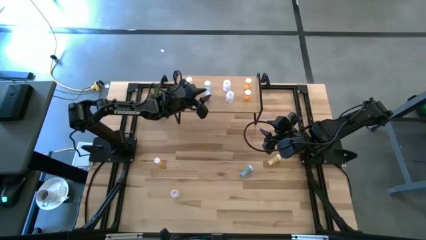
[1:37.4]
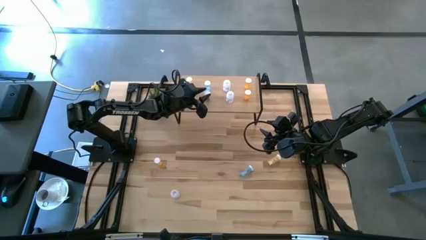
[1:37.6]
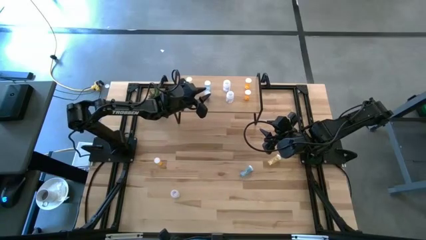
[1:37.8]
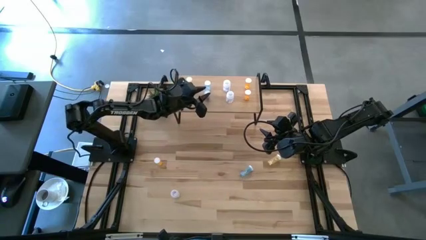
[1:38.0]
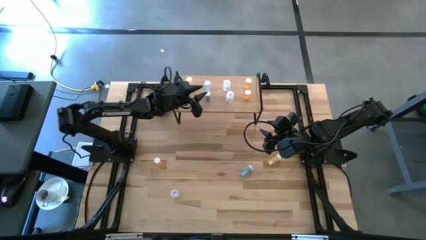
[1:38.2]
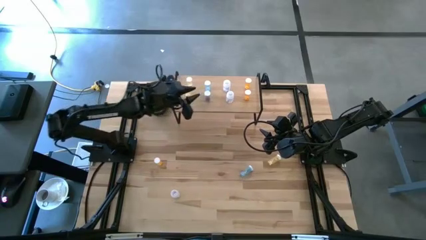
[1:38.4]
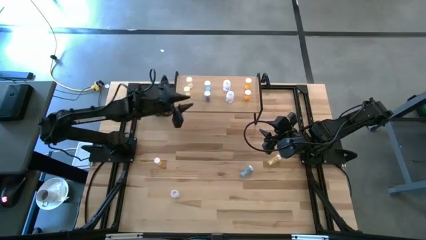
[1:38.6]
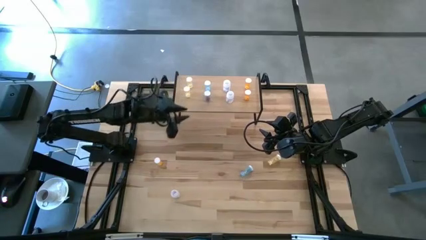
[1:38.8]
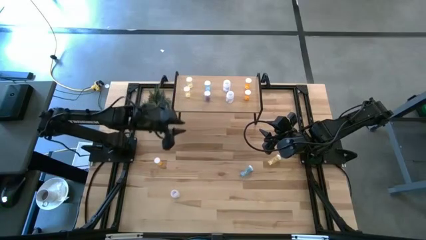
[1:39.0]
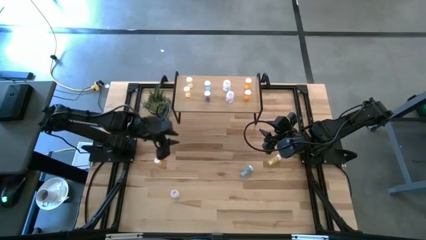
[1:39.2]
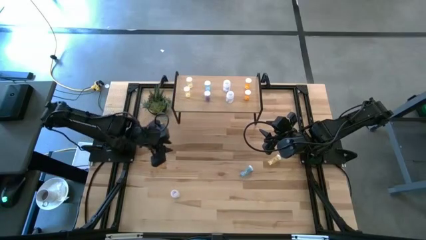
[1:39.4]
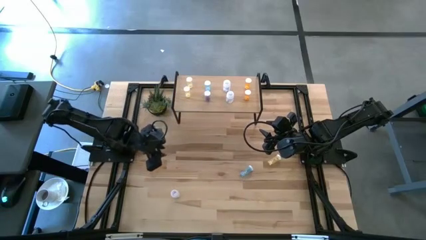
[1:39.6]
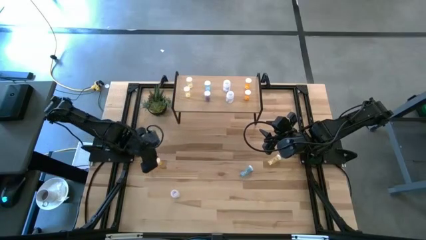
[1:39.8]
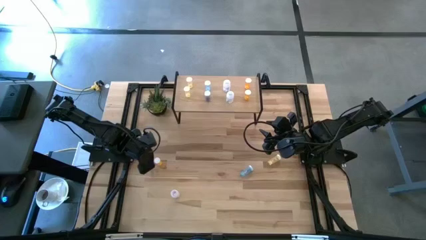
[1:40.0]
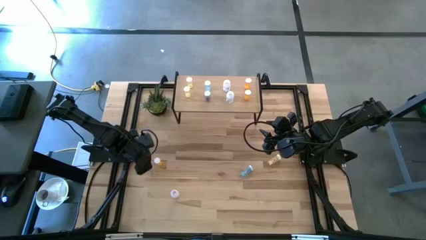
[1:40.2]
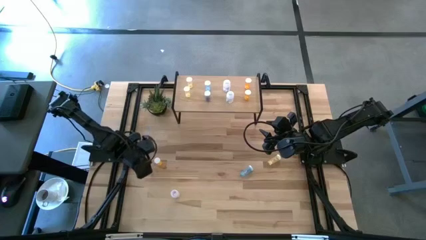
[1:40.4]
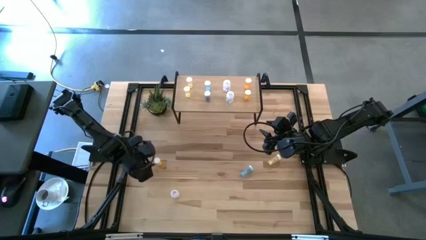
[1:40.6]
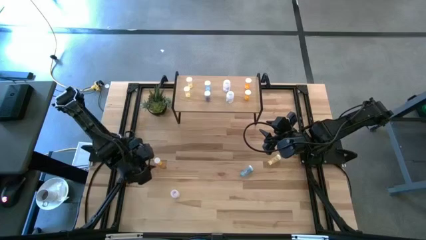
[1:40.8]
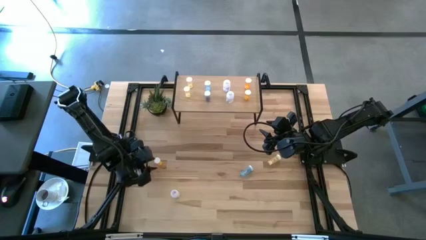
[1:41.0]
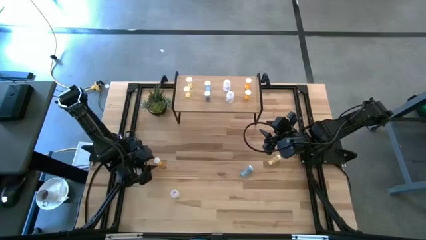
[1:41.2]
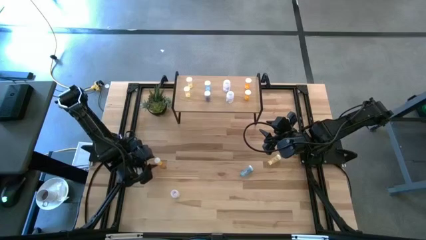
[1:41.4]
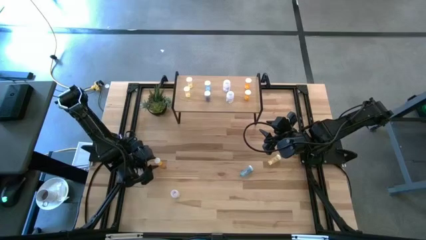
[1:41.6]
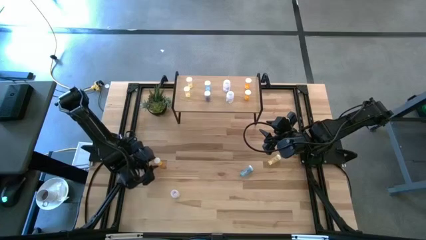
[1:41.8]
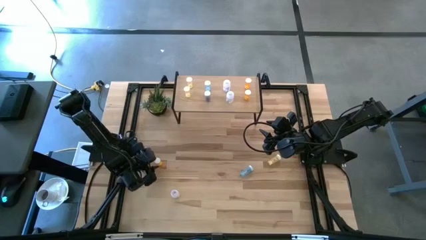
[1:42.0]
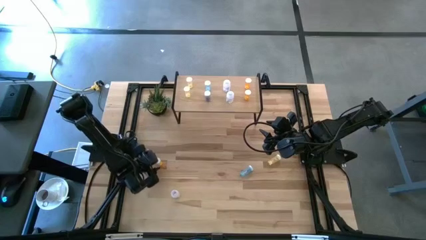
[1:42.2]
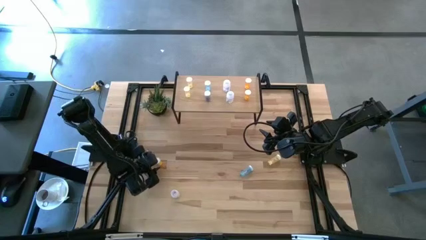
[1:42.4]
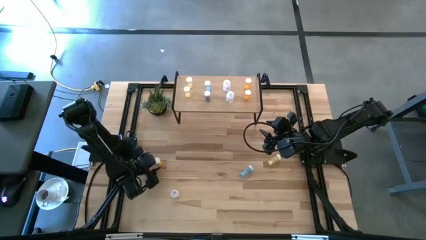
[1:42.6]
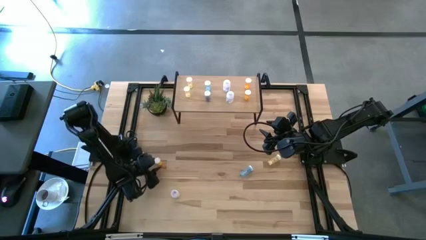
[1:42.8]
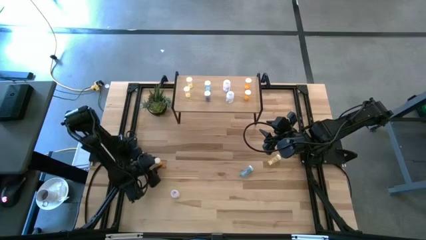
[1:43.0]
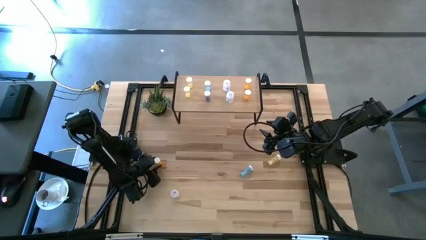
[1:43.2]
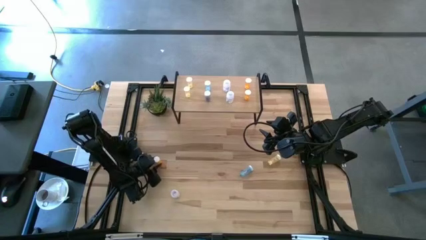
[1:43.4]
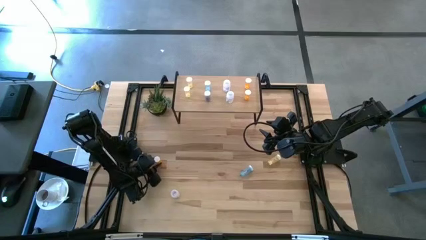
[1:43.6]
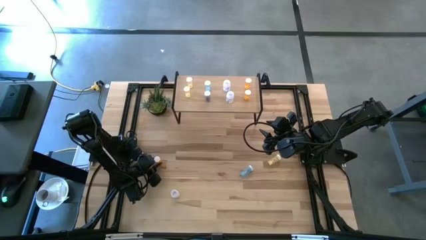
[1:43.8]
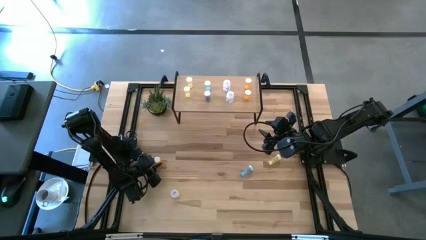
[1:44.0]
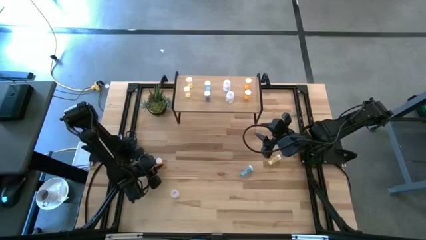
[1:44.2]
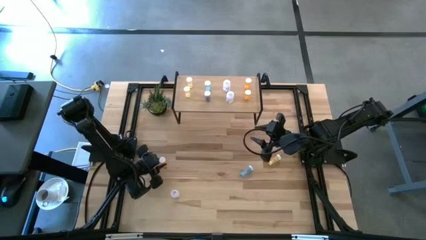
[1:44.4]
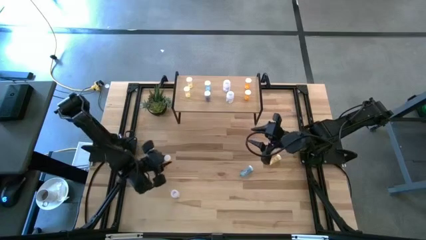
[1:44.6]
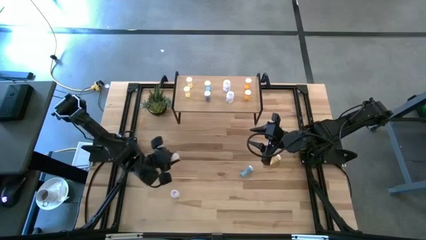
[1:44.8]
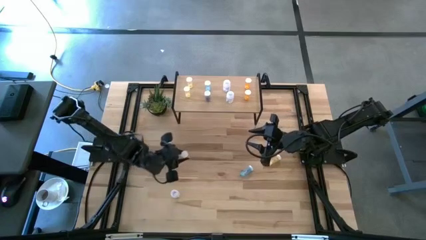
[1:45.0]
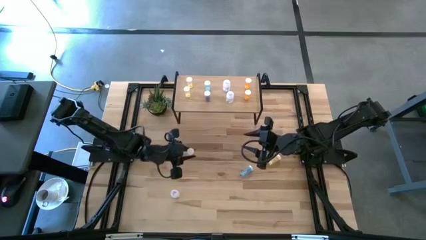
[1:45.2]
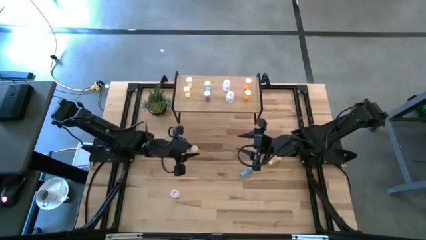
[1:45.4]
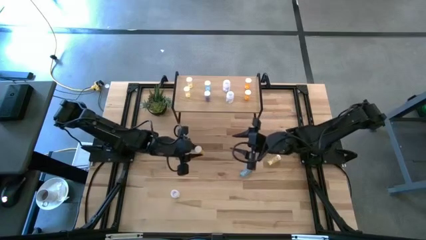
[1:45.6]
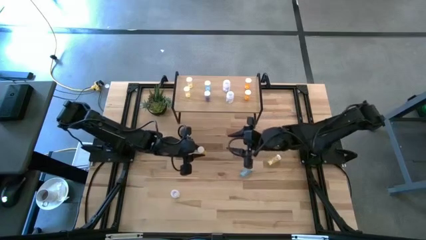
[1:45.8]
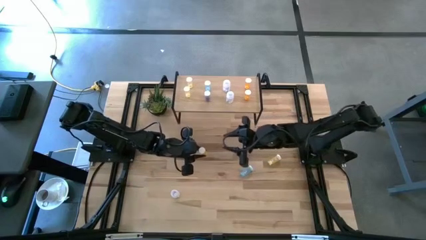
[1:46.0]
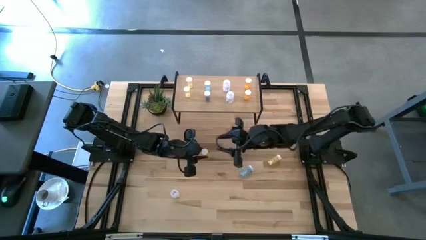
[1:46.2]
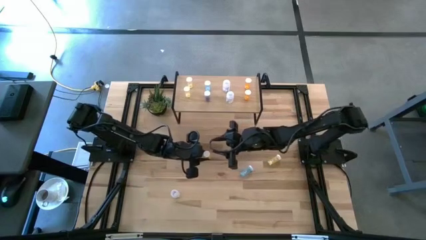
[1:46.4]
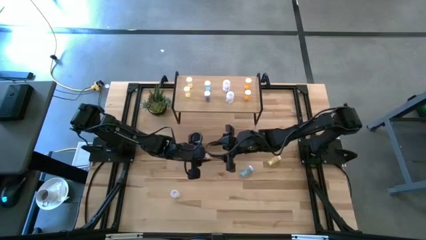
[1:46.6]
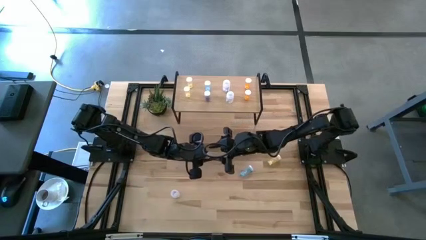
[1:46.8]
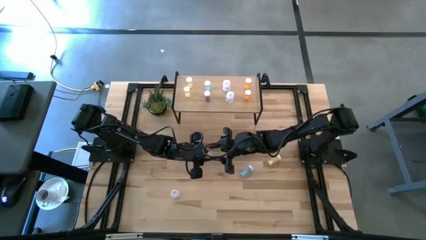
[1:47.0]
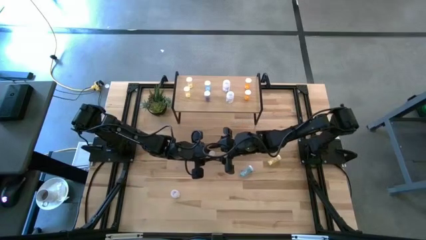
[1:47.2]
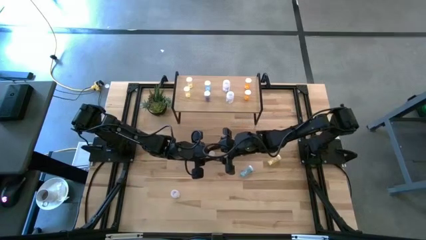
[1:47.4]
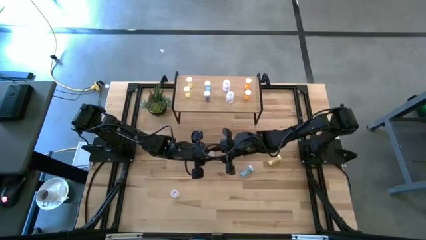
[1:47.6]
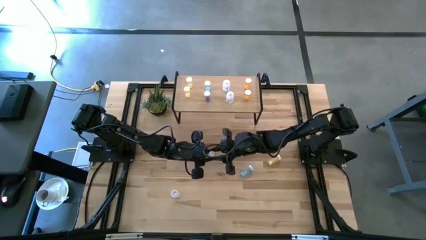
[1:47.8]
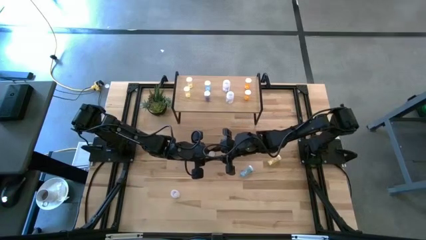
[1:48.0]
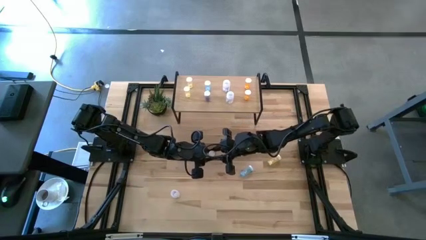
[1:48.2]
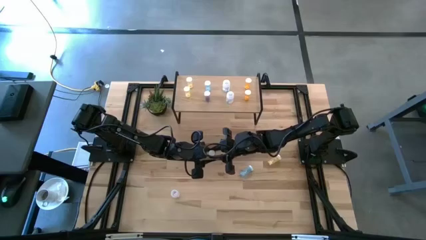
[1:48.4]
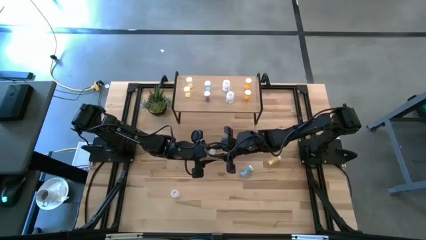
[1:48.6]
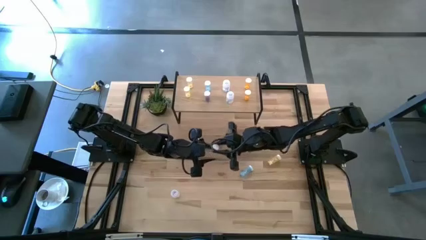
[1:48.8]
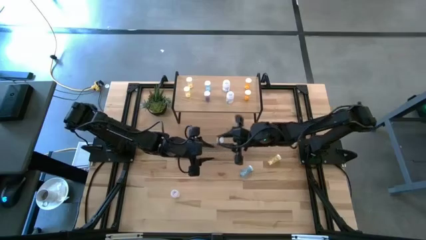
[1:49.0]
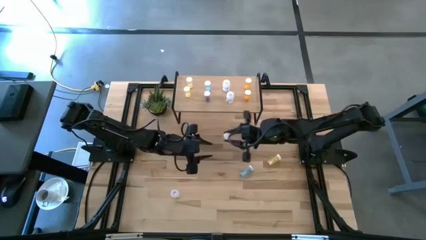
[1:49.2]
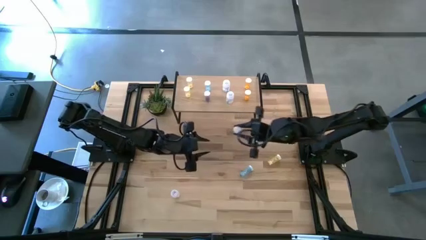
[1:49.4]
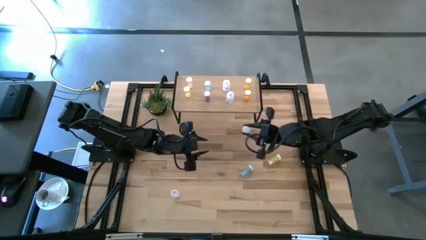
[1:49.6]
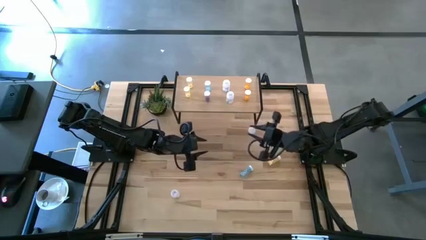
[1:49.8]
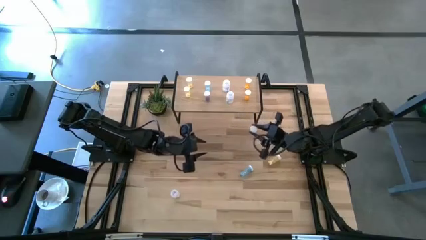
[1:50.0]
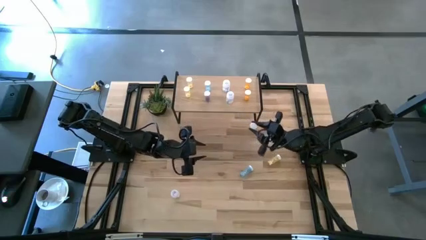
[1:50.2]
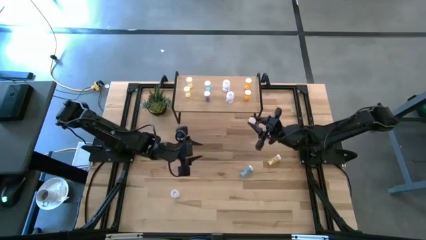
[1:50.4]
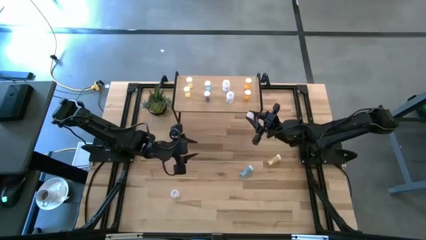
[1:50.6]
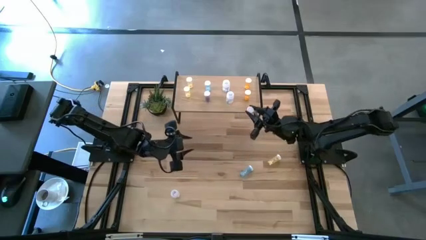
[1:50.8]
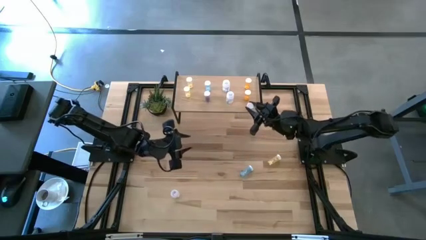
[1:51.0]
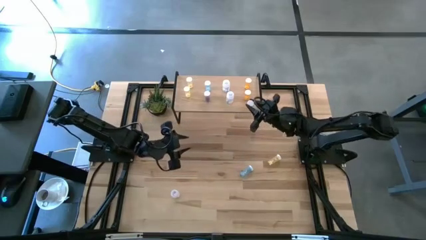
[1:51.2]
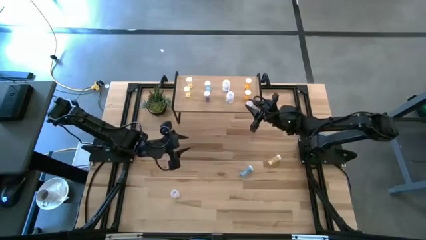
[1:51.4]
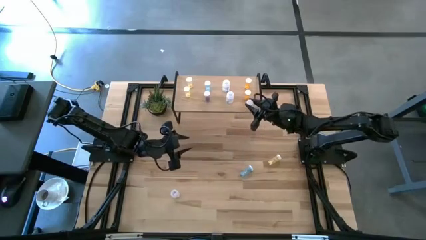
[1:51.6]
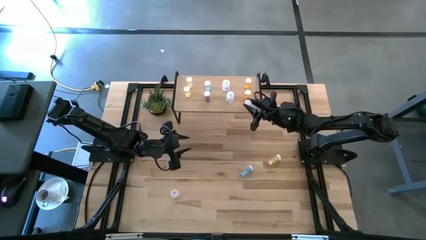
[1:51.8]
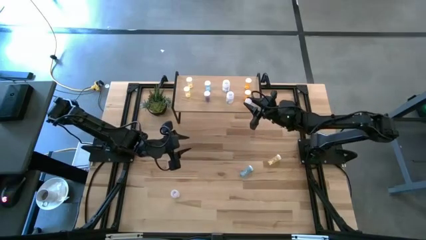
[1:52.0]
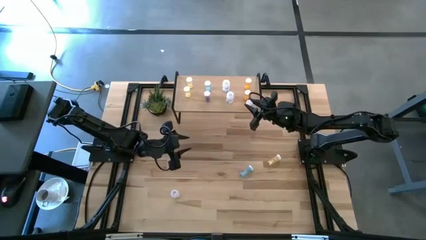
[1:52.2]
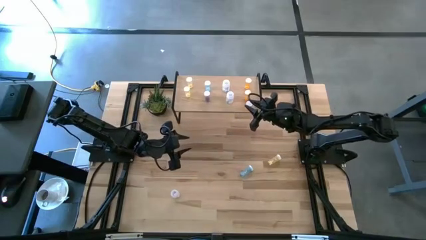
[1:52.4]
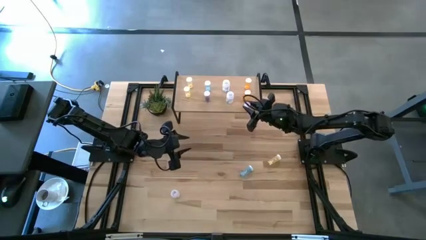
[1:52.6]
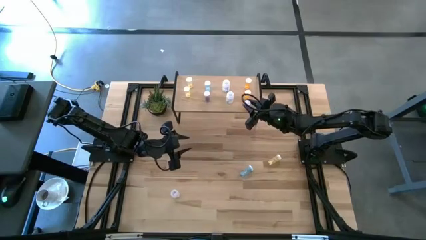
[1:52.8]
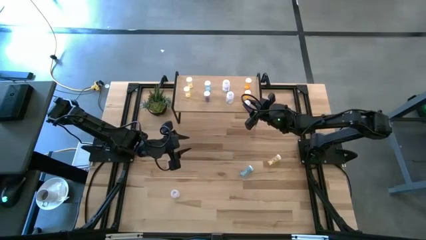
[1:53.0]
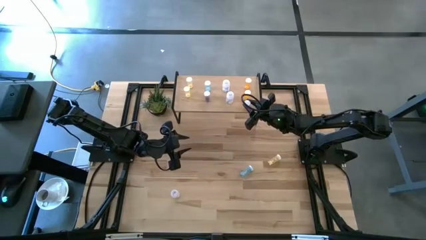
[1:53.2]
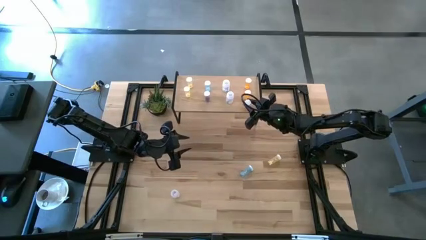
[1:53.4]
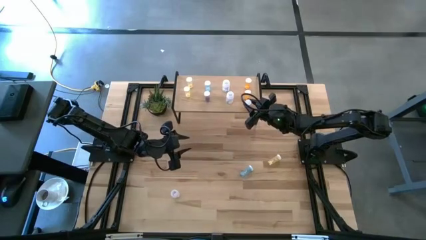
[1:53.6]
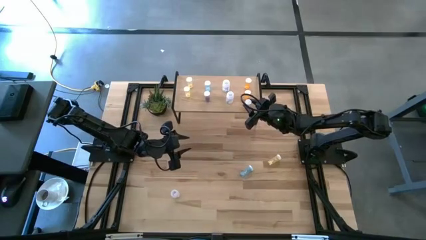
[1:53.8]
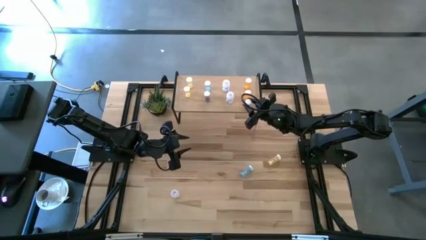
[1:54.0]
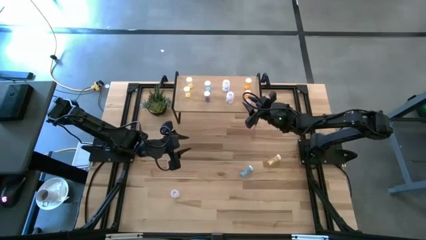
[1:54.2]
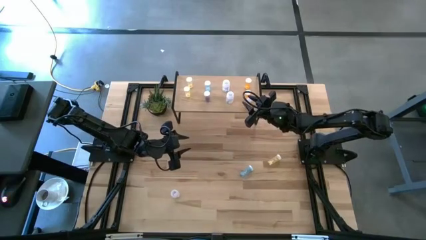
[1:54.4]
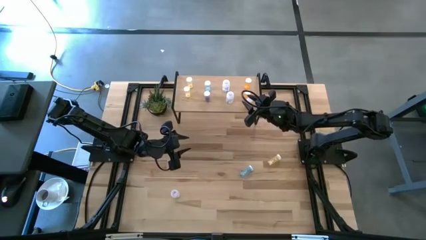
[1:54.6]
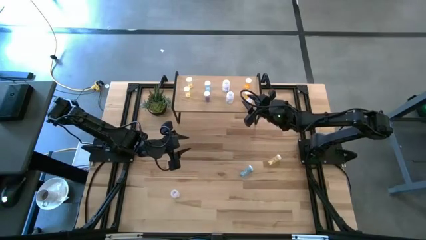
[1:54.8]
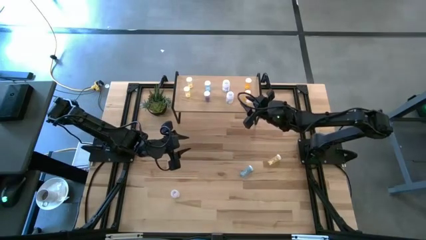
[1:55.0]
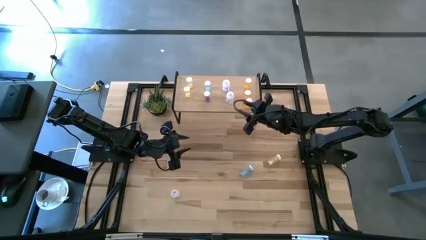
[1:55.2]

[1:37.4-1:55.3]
Task: Pick and place medicine bottles onto shelf by color
Put the orange pill bottle on the shelf
